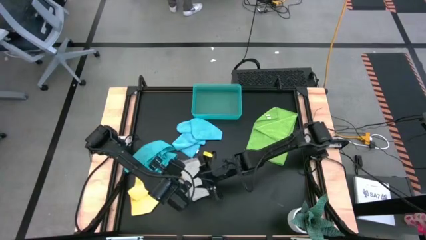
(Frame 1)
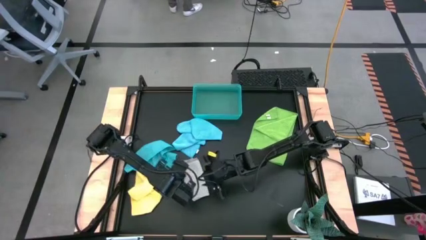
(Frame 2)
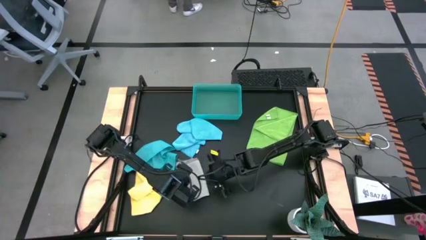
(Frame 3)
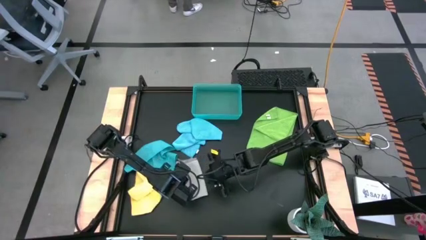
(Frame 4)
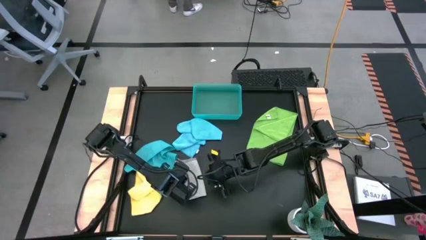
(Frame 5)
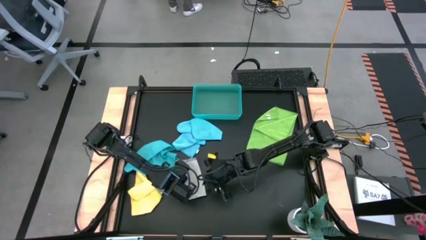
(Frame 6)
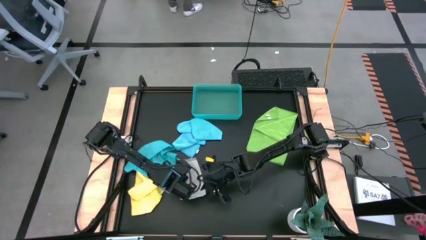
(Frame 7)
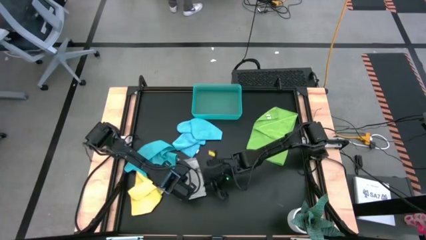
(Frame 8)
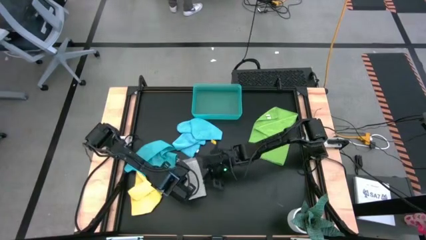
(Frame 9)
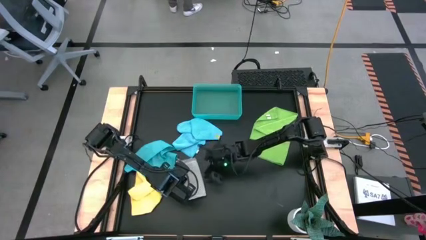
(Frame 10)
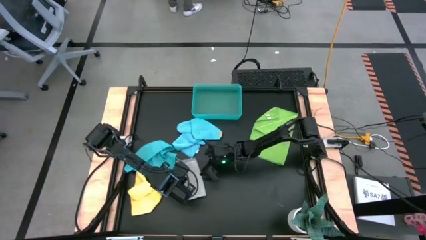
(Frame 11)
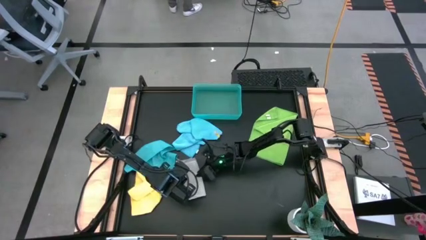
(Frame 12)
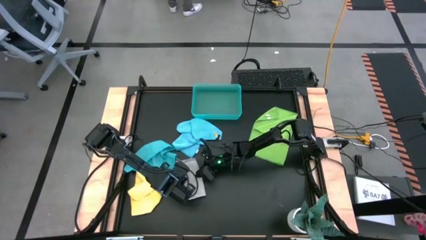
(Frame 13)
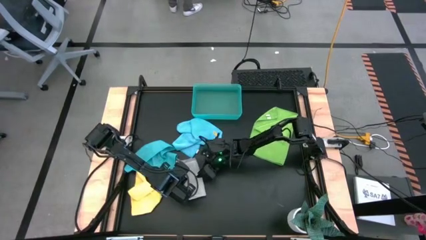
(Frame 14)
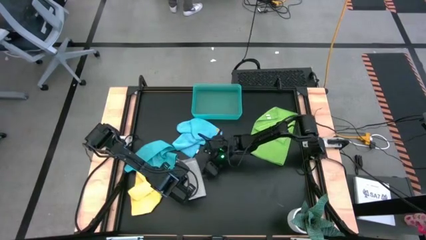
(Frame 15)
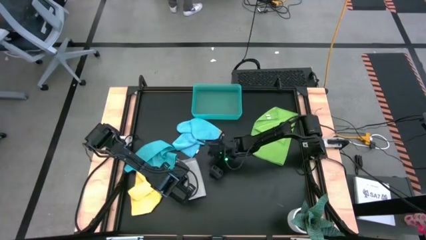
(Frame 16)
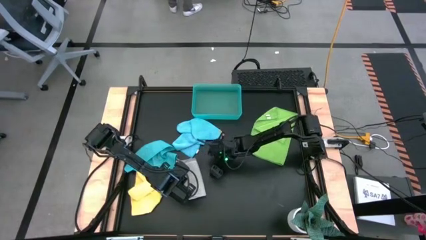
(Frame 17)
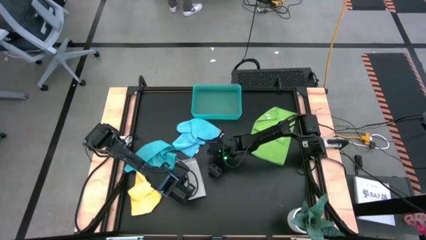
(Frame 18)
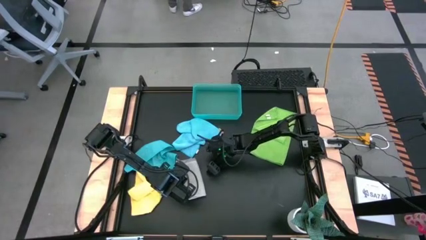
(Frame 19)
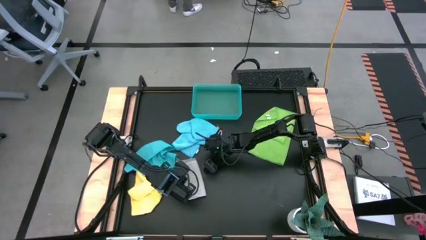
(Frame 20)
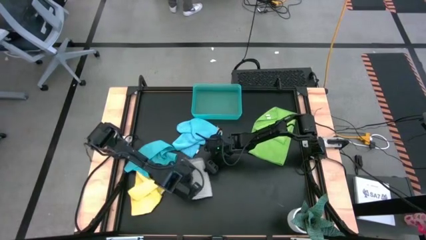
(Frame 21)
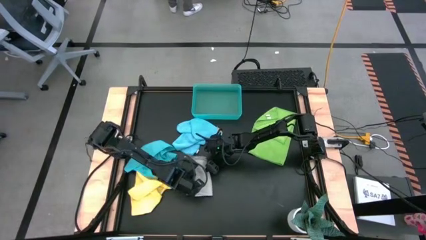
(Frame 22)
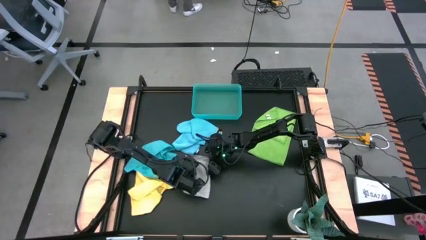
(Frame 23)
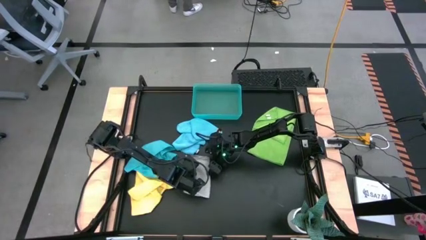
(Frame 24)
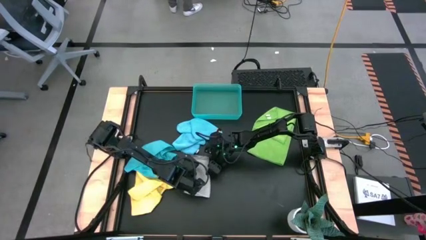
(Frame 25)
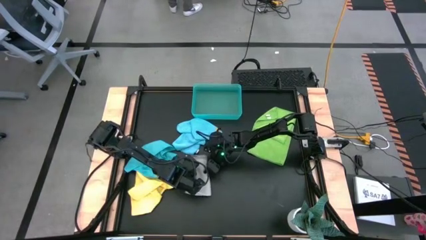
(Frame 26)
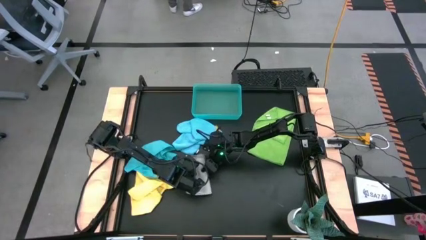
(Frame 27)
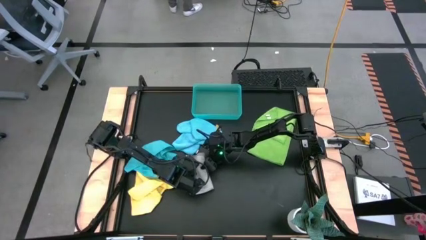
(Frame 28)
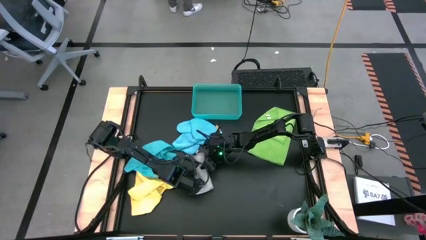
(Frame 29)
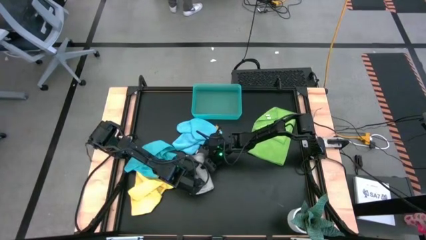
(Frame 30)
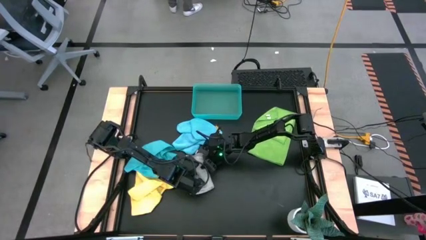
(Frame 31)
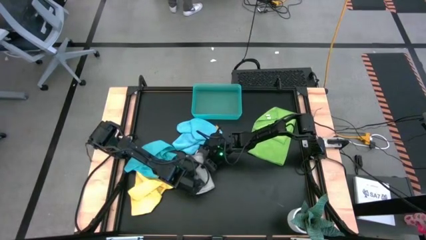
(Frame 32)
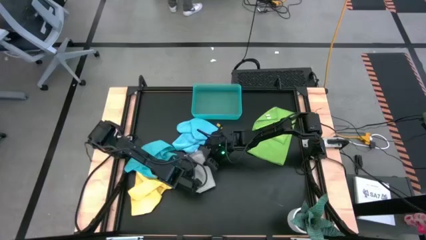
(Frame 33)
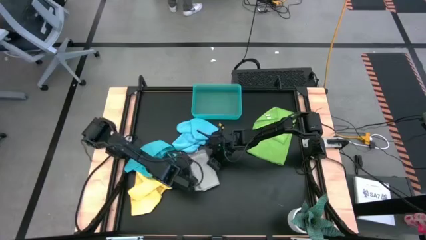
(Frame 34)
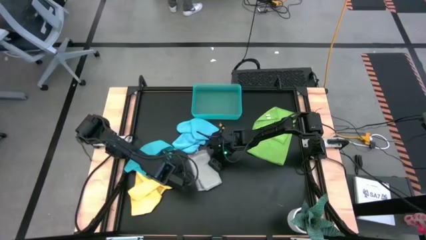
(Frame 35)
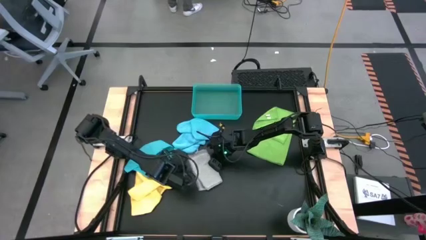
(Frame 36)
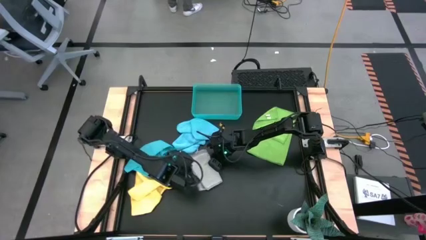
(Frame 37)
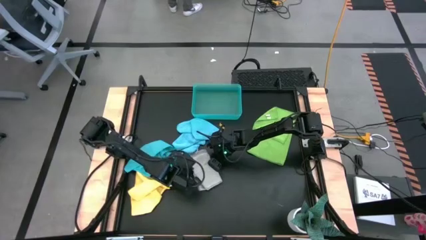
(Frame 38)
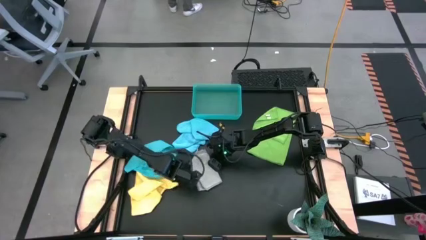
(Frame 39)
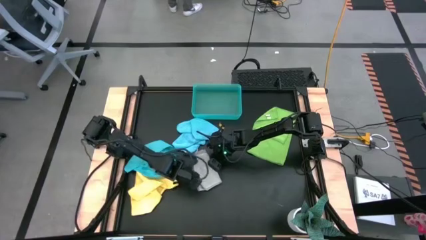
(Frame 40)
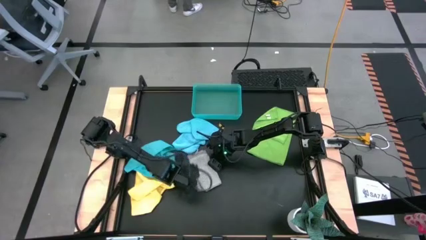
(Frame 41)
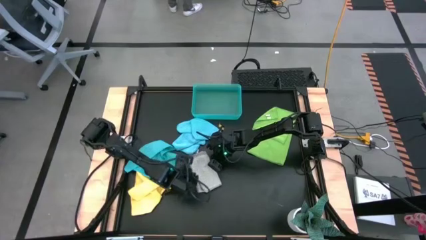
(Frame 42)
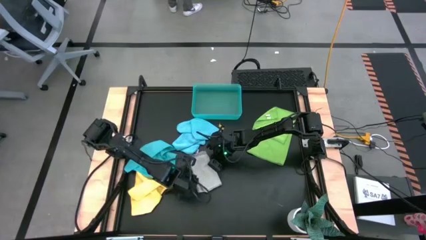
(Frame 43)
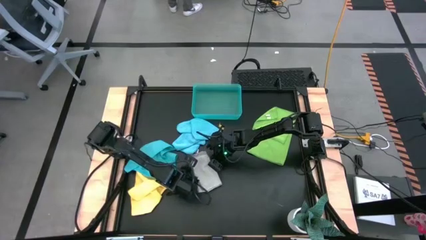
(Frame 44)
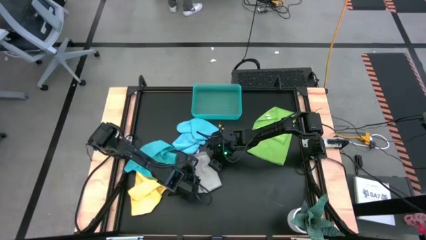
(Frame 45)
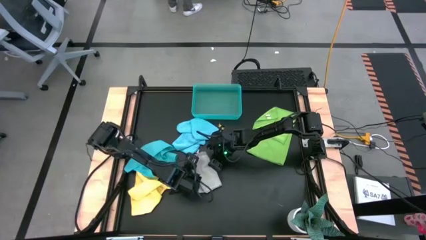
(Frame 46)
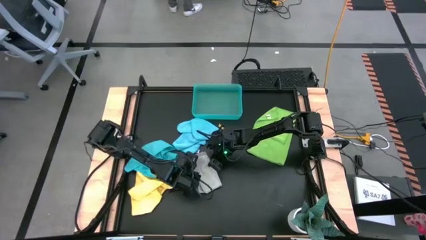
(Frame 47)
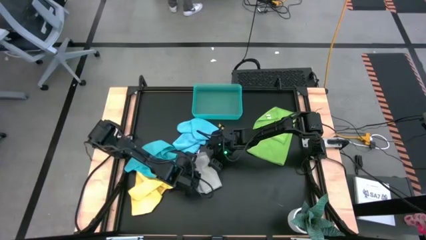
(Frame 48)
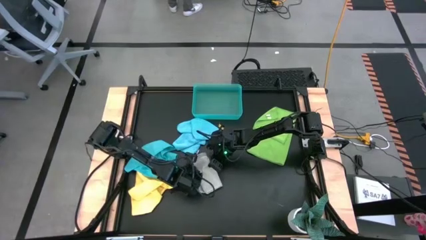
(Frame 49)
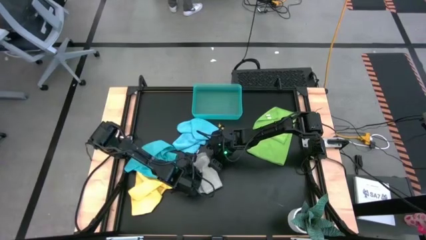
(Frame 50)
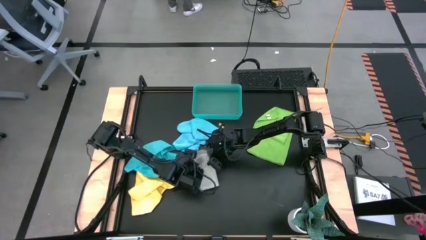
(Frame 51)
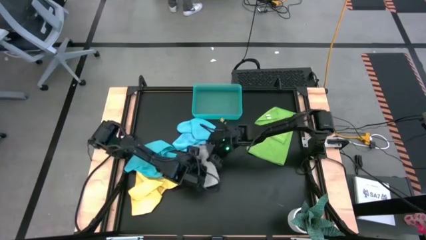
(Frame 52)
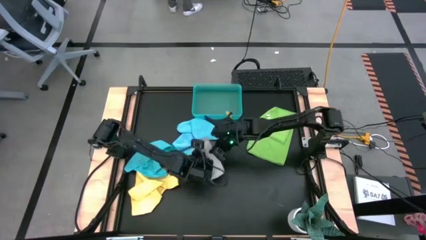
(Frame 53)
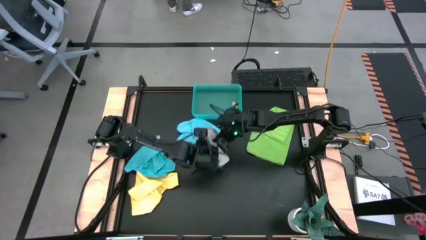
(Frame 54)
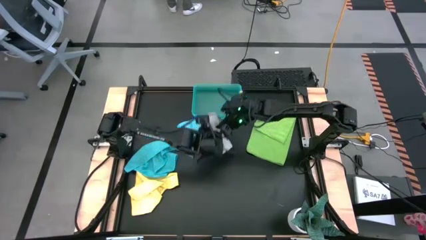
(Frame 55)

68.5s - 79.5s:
Task: Fold microfiber towels
Put the gray microfiber towel into the blue bin
